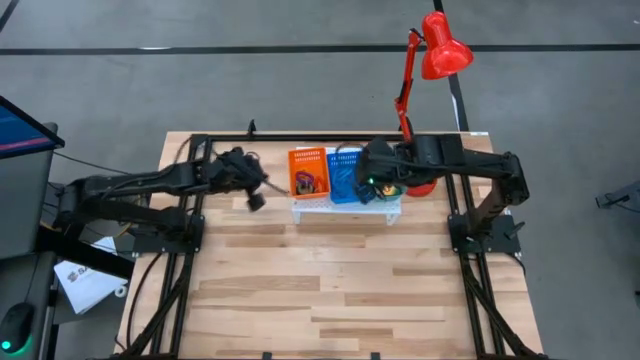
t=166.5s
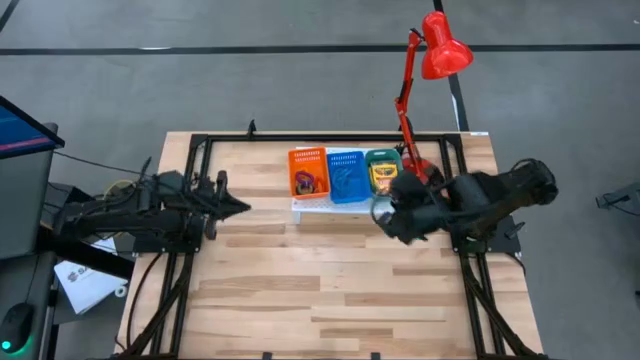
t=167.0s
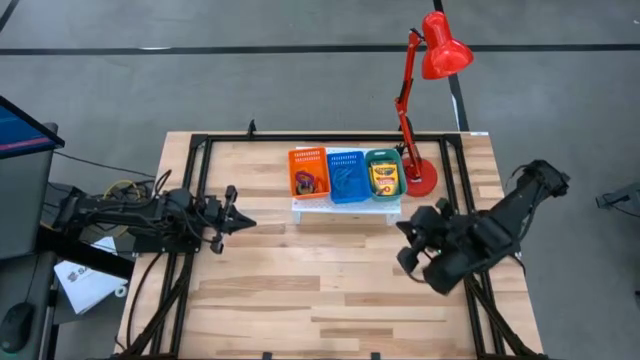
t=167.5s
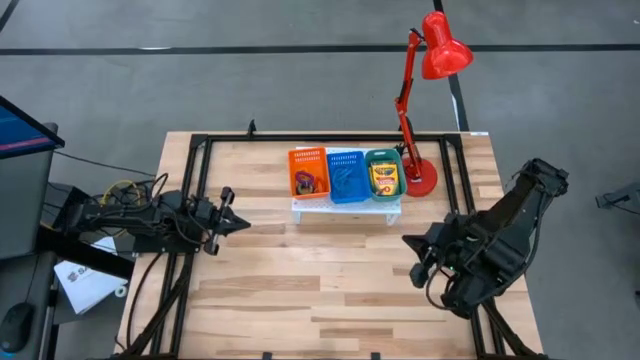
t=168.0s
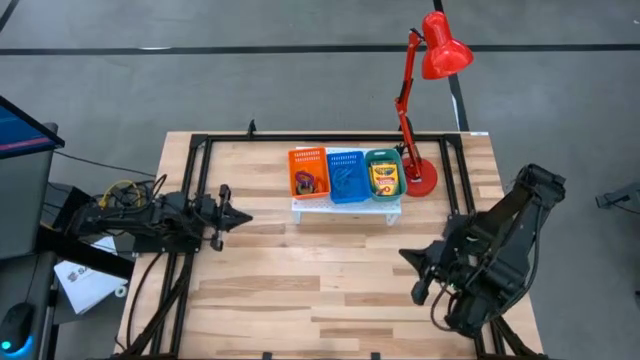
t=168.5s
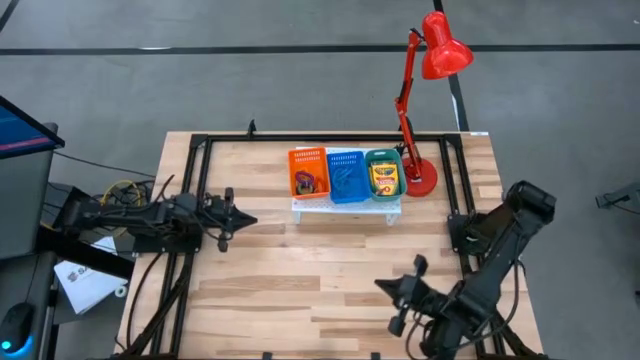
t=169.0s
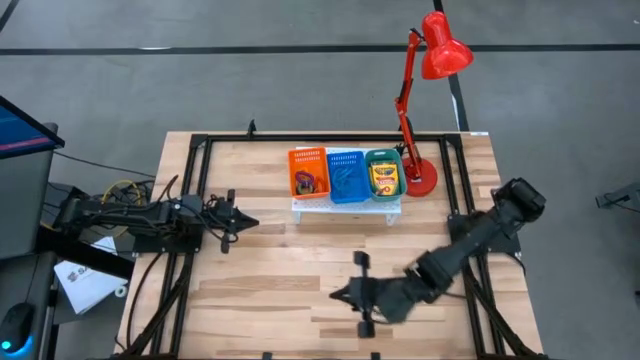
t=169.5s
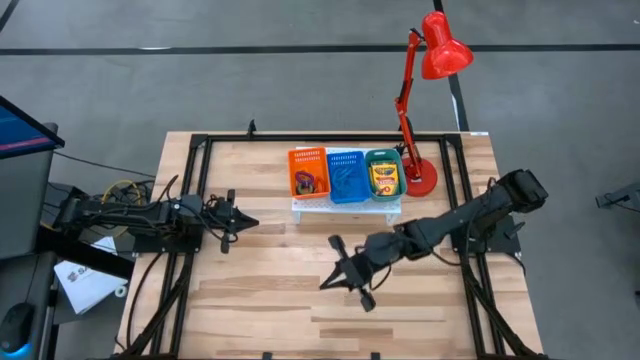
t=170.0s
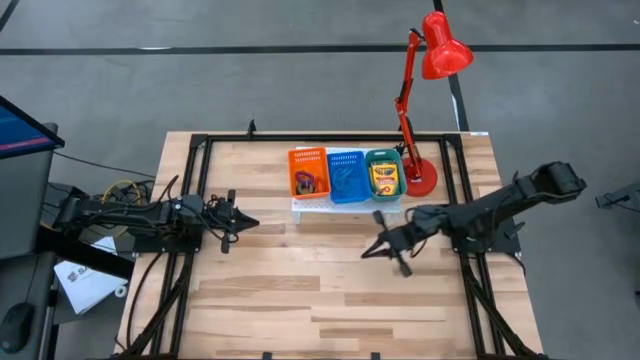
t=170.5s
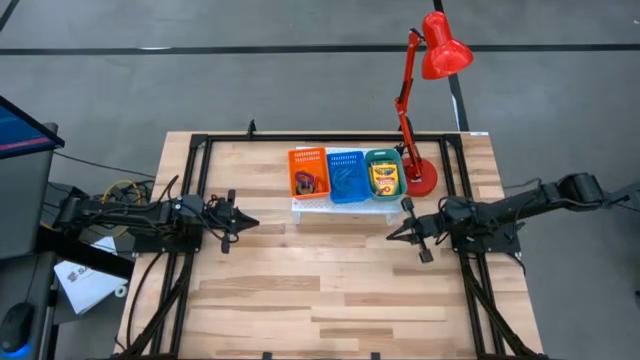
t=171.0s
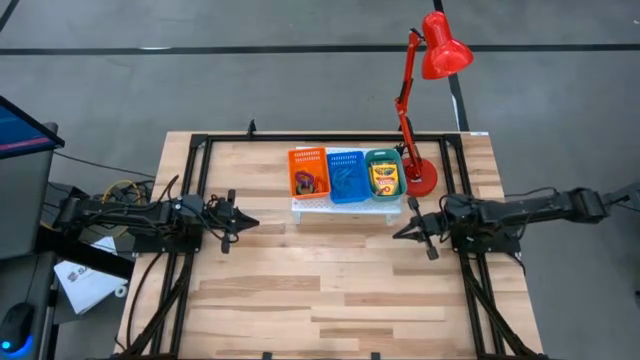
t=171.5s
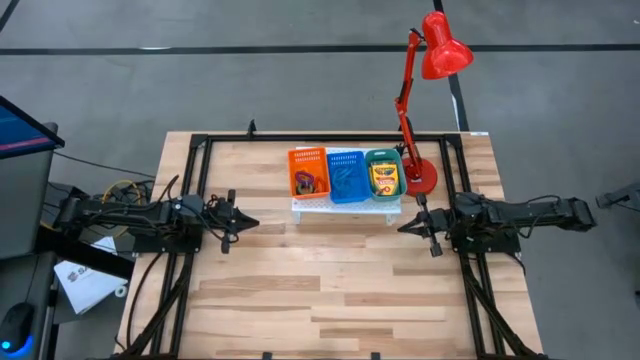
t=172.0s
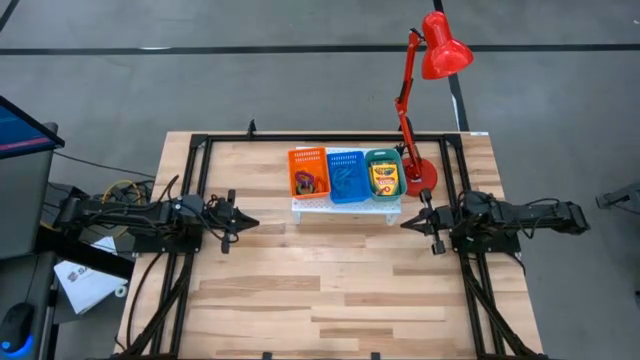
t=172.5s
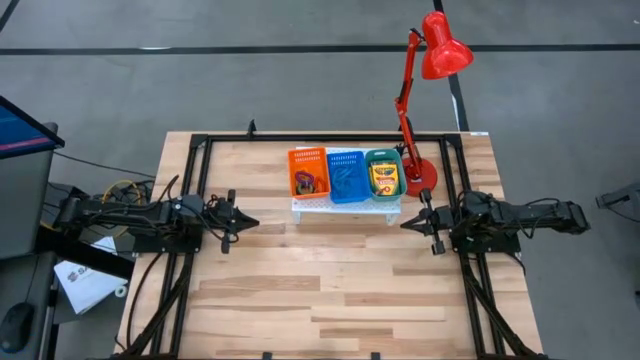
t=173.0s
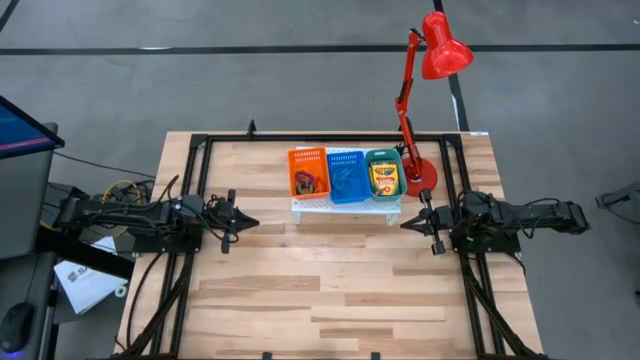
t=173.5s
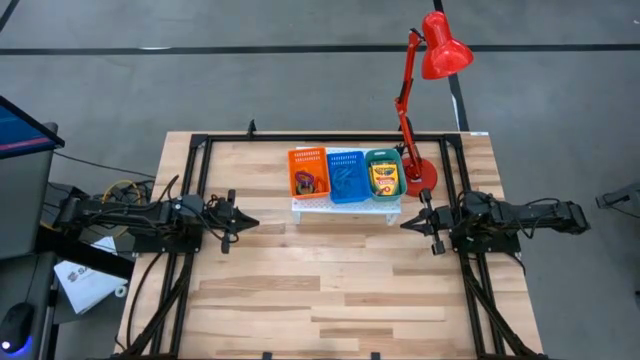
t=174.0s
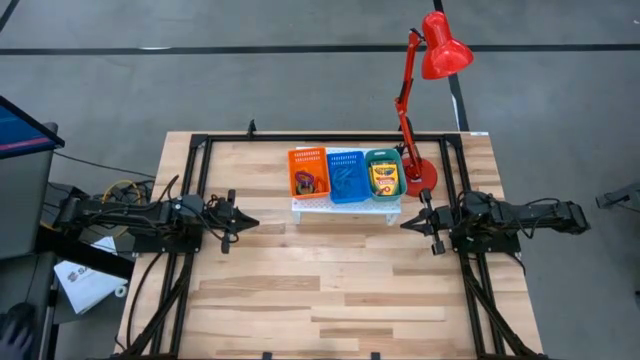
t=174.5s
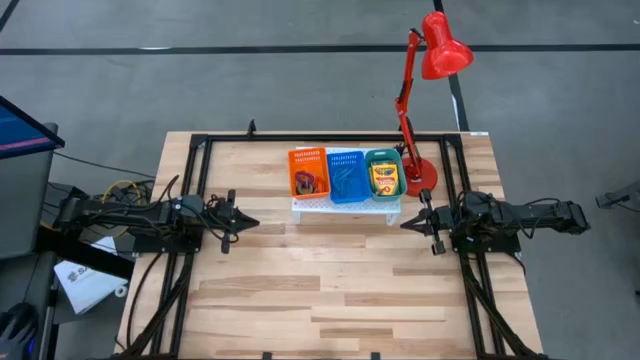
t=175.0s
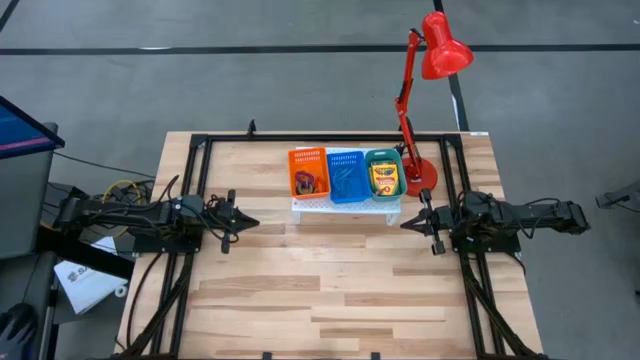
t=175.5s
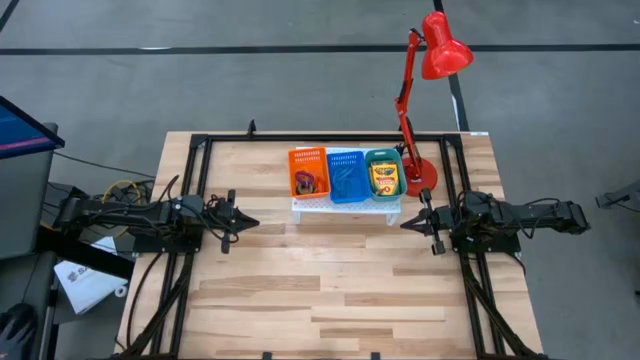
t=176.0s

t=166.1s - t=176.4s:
Task: Pick & Place Office Desk Supplies
Return to Home Position

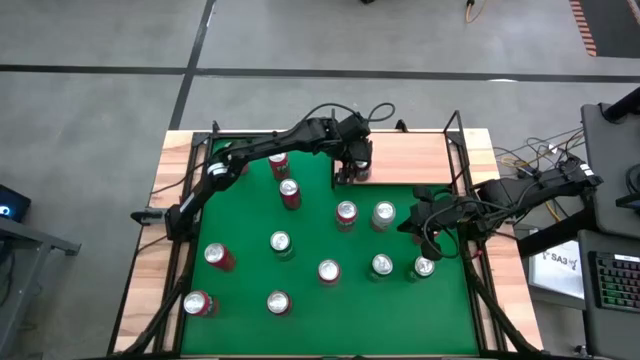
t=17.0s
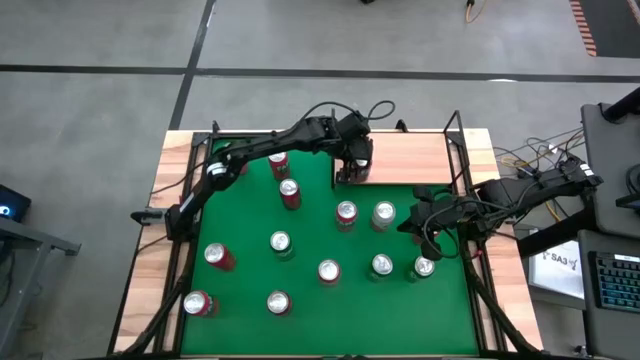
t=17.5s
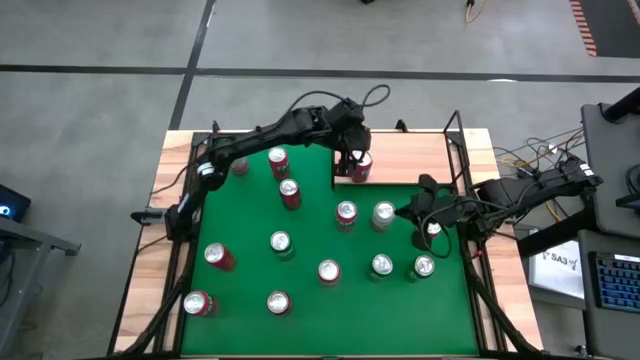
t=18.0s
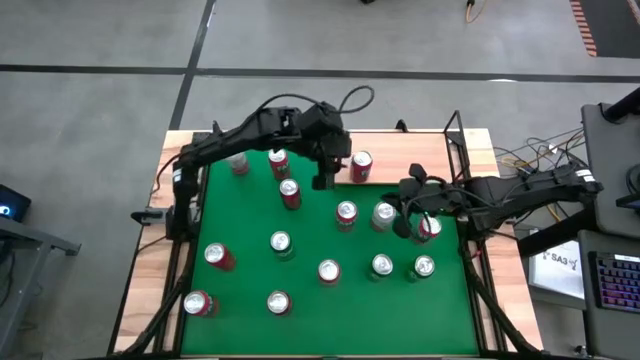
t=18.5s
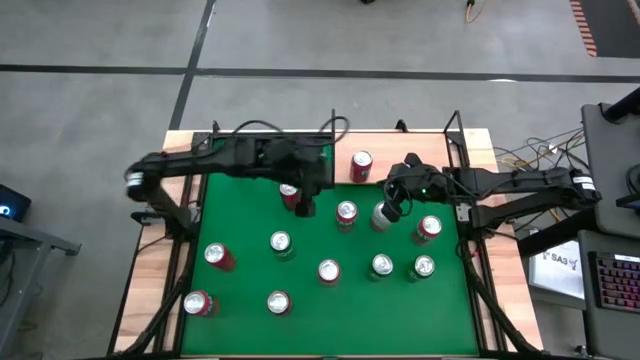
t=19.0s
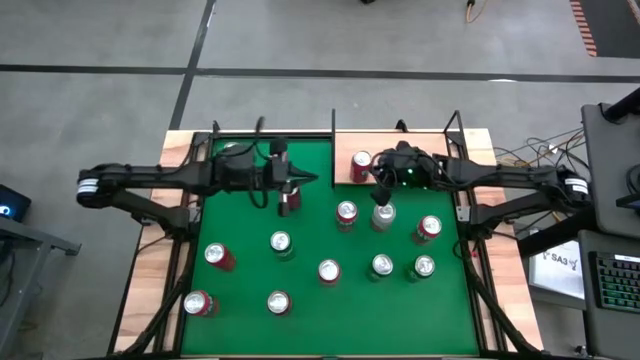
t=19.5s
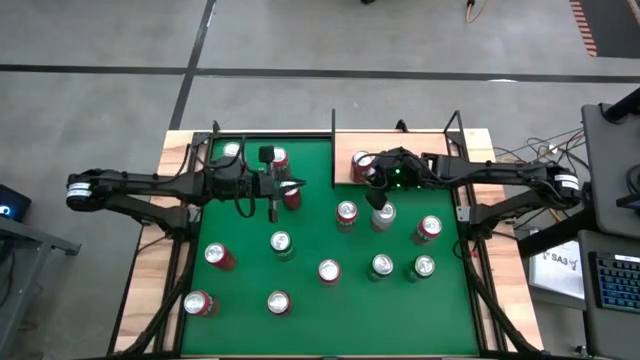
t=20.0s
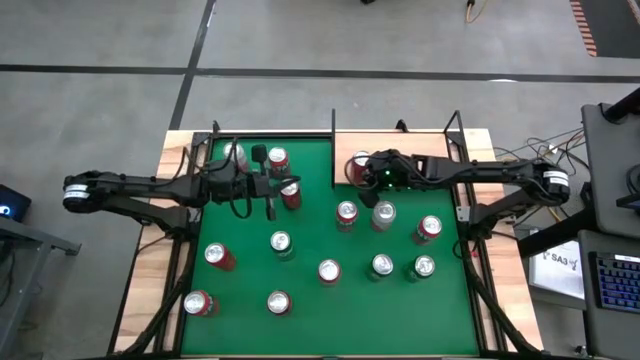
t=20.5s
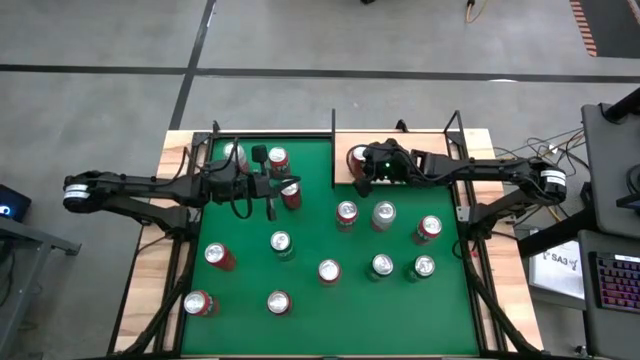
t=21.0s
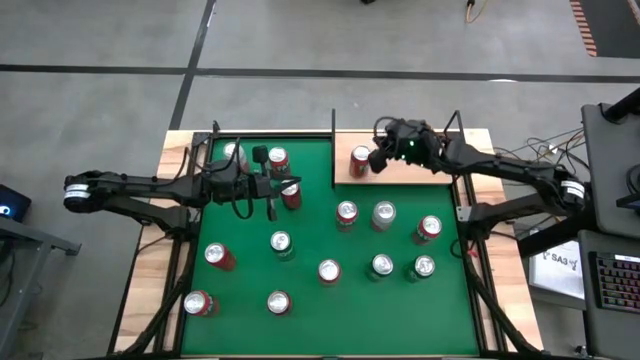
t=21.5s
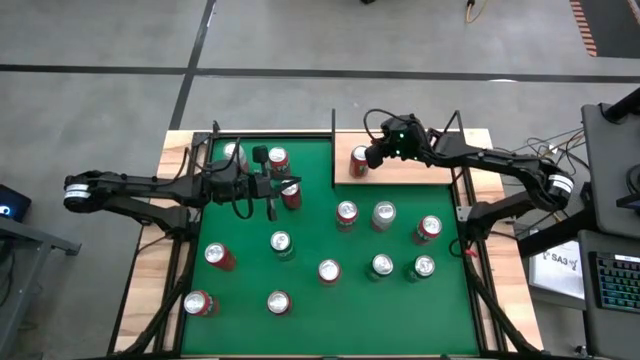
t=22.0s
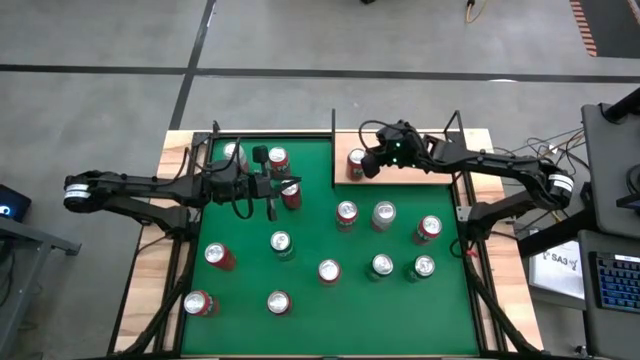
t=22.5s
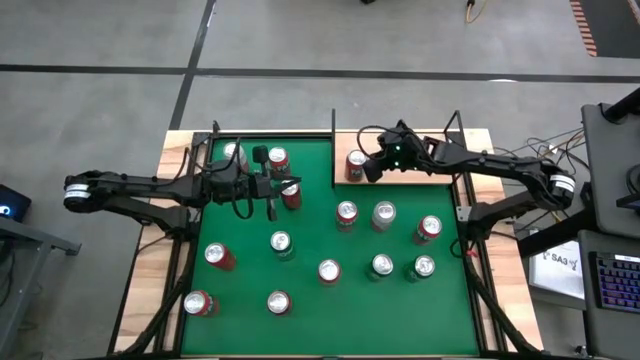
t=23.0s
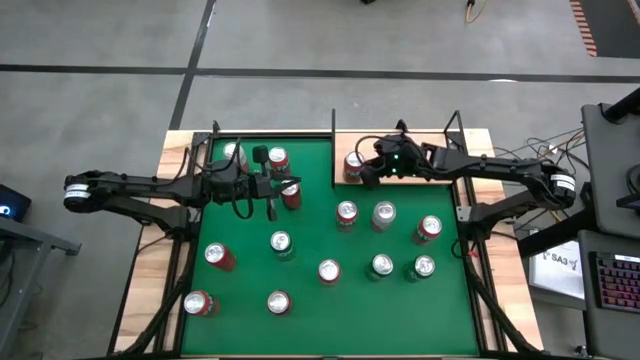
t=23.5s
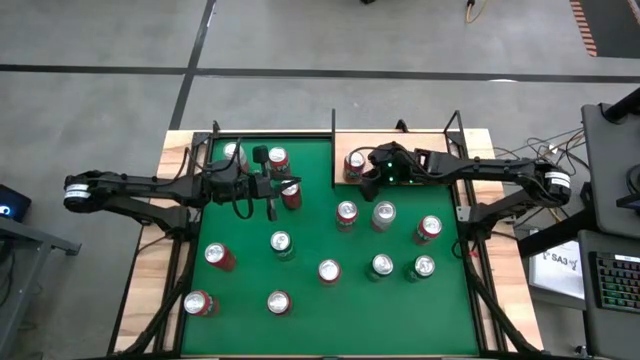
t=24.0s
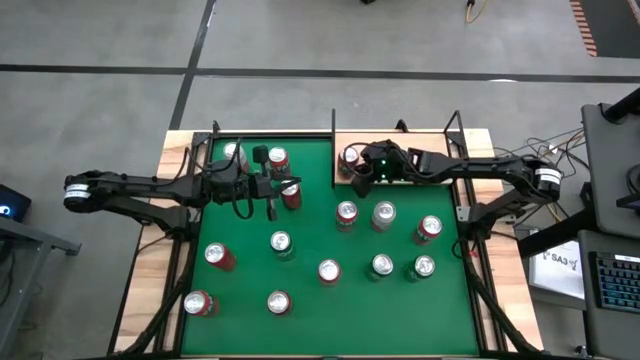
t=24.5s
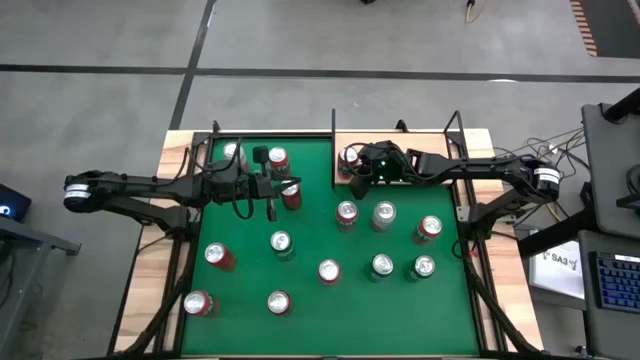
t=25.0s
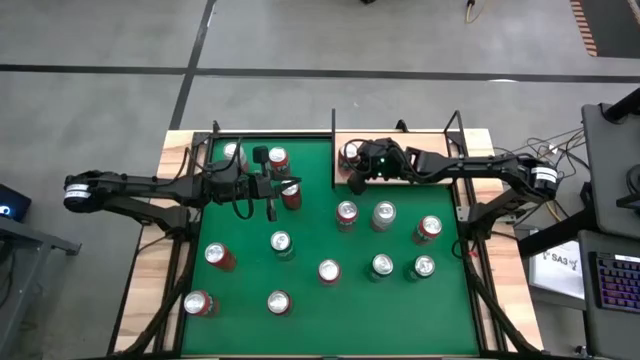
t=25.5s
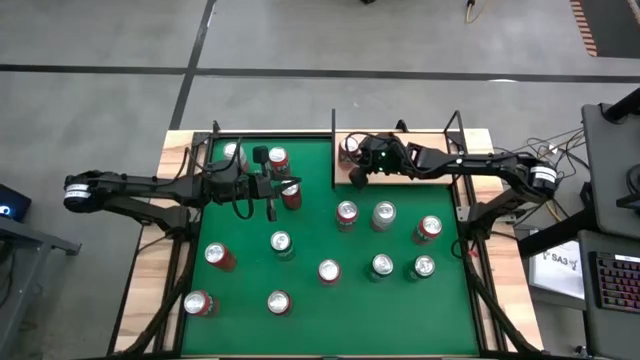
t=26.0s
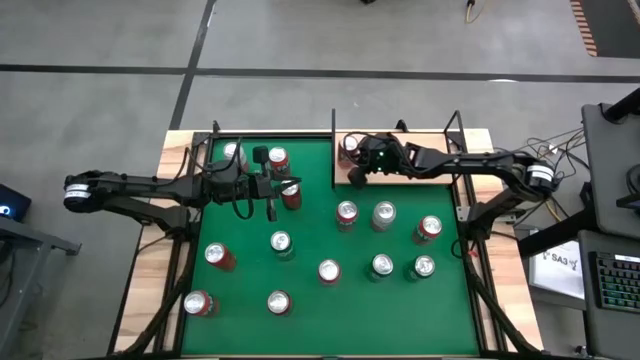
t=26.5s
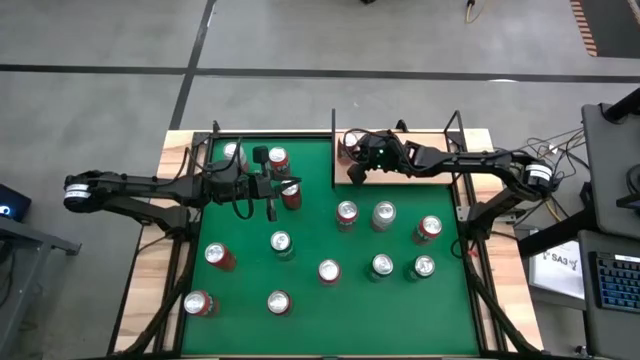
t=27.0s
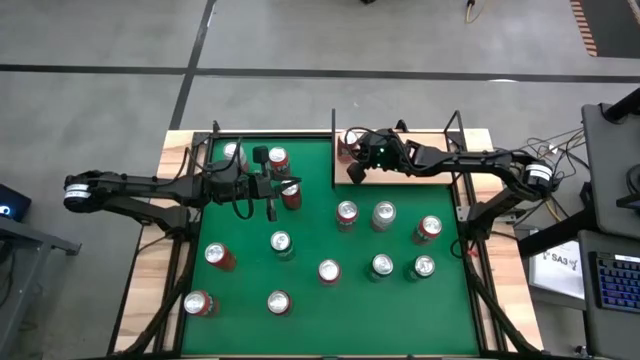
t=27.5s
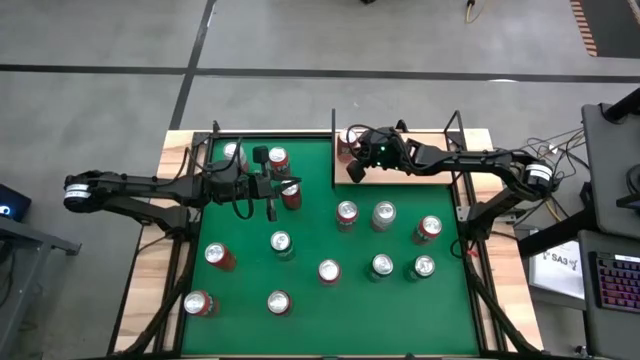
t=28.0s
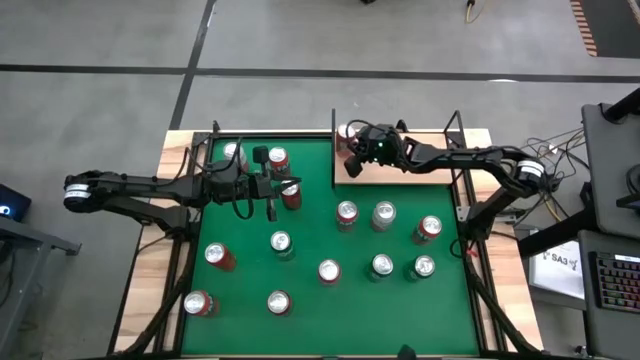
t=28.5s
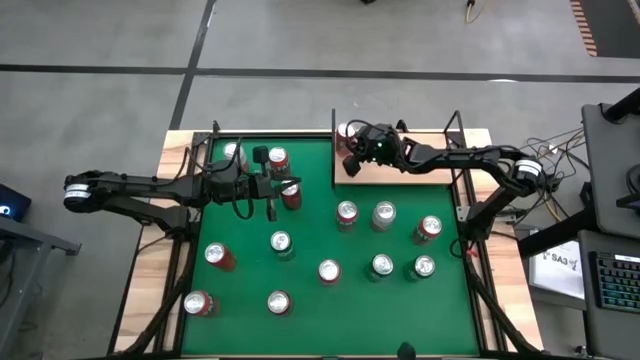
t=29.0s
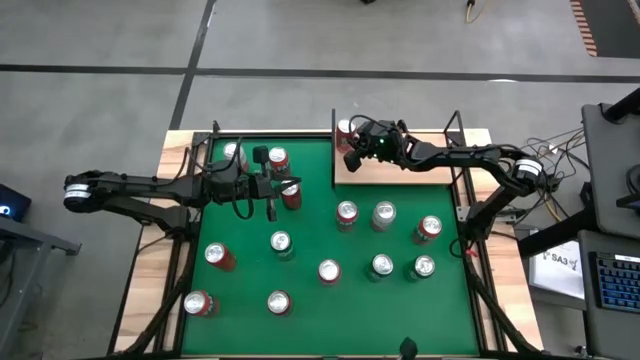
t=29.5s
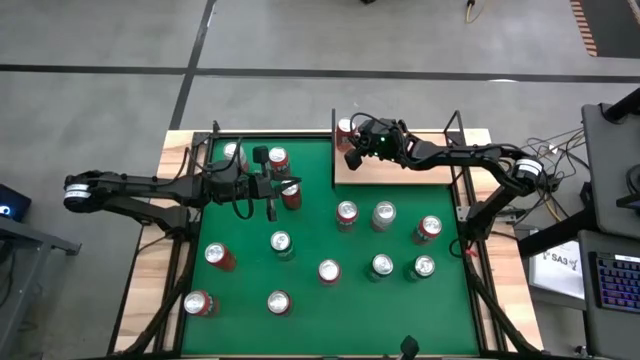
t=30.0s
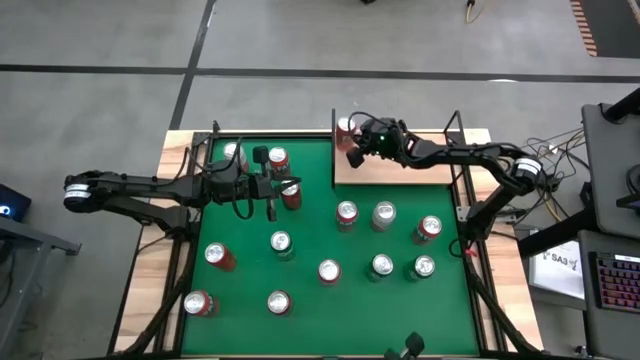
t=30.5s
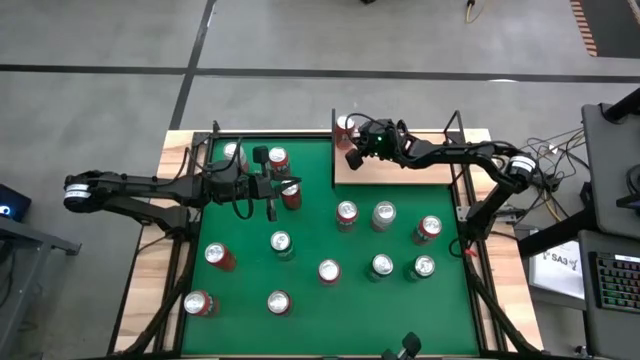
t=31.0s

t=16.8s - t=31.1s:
Task: Place canned beverage on shelf
Put the red soda can on the shelf
